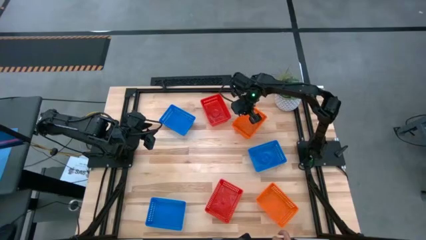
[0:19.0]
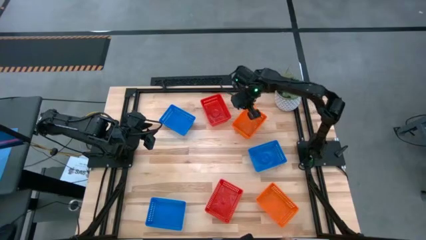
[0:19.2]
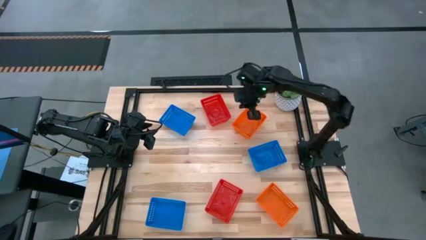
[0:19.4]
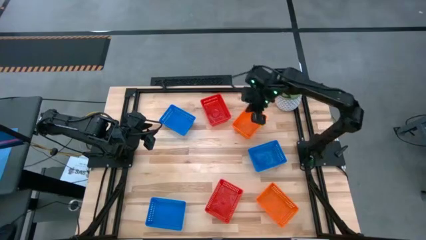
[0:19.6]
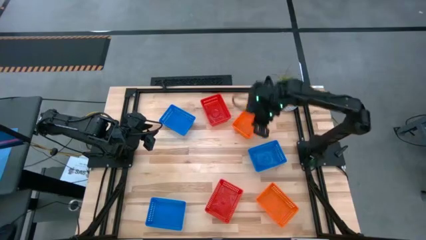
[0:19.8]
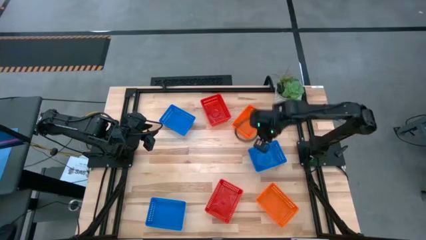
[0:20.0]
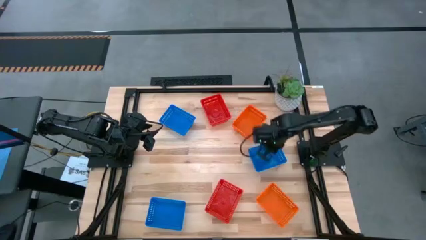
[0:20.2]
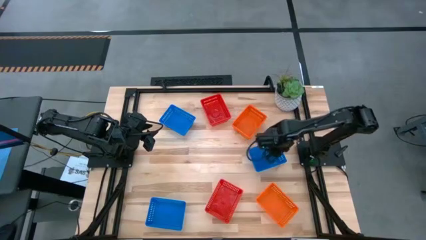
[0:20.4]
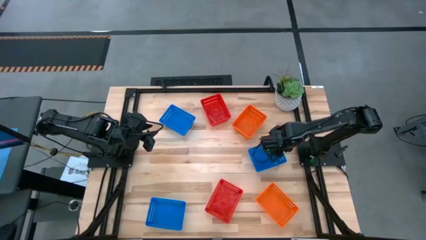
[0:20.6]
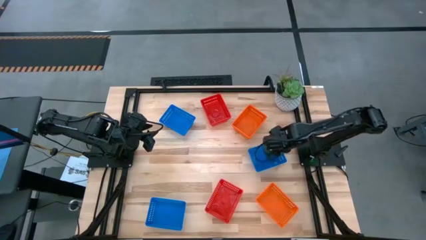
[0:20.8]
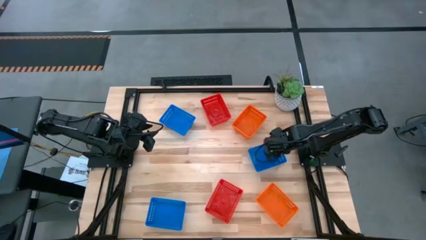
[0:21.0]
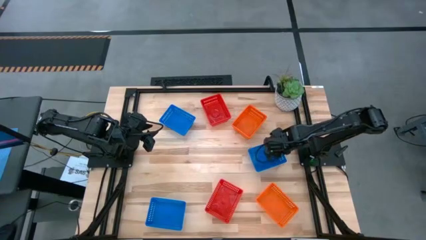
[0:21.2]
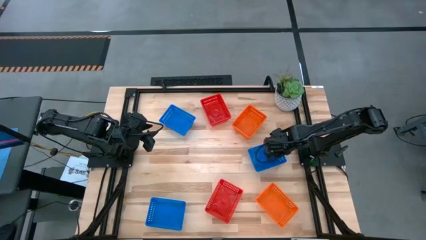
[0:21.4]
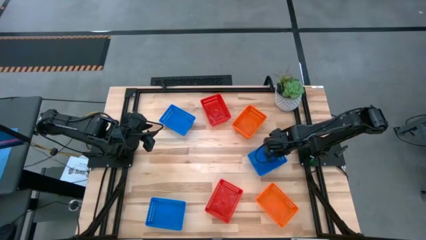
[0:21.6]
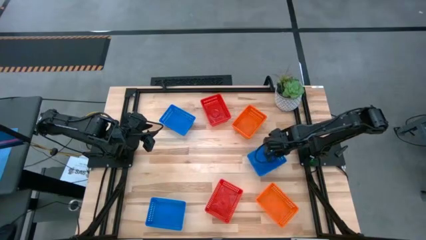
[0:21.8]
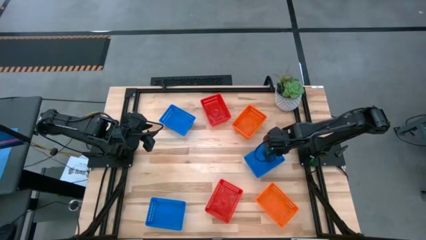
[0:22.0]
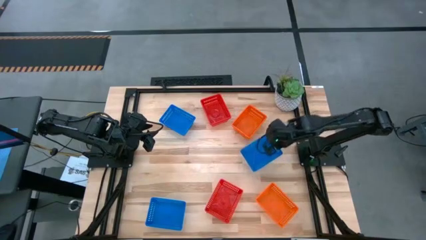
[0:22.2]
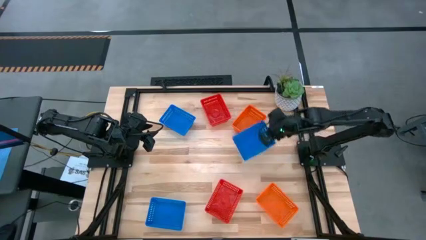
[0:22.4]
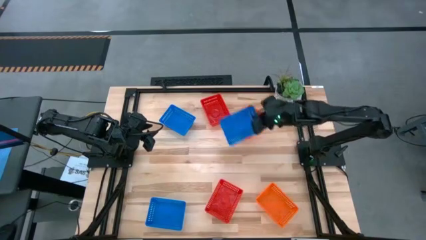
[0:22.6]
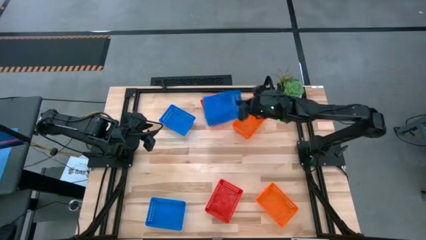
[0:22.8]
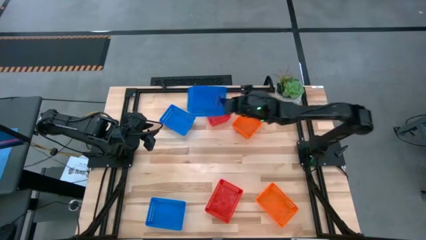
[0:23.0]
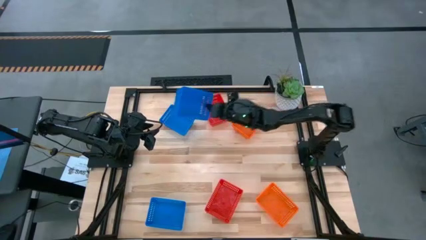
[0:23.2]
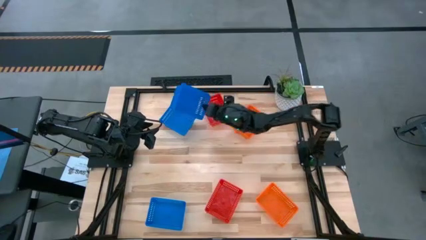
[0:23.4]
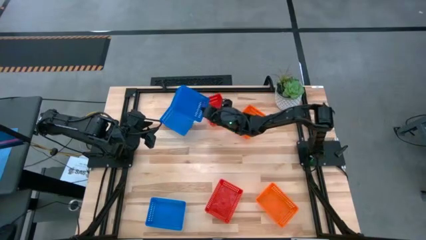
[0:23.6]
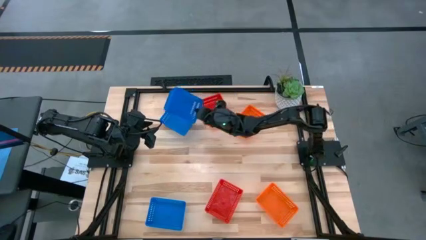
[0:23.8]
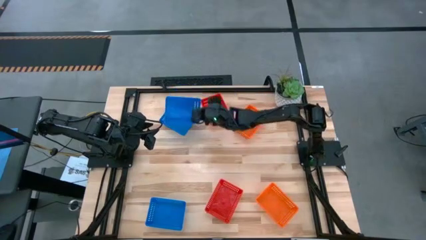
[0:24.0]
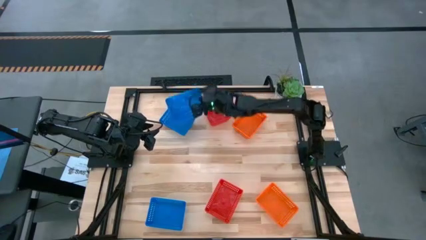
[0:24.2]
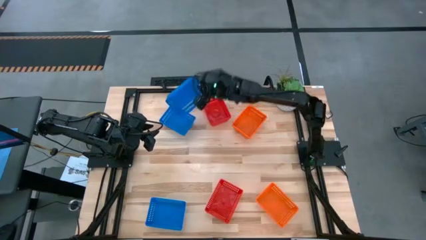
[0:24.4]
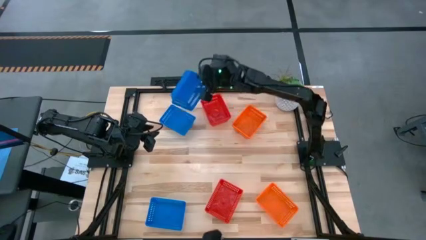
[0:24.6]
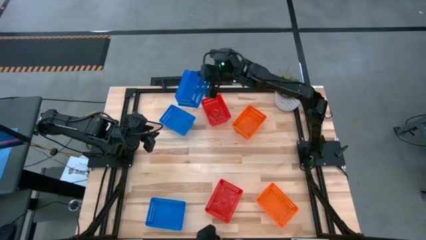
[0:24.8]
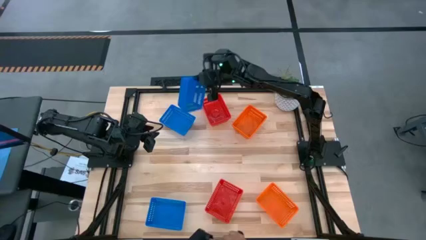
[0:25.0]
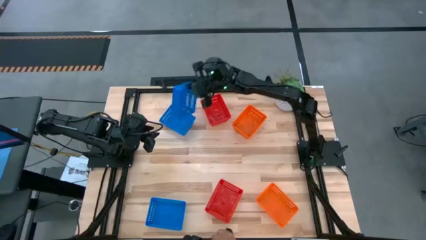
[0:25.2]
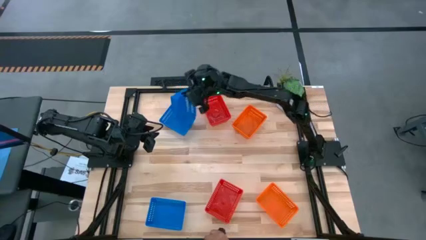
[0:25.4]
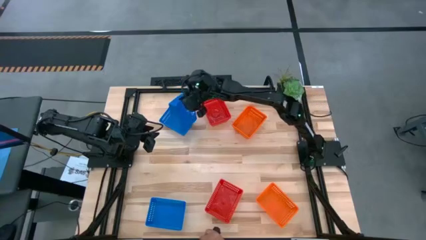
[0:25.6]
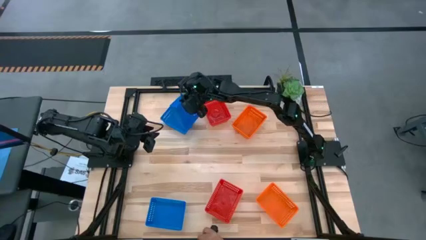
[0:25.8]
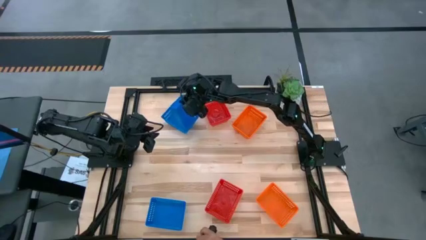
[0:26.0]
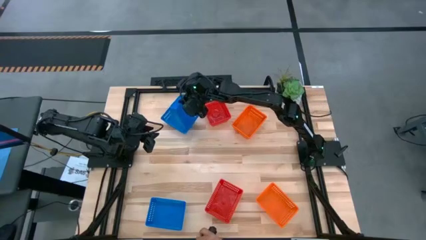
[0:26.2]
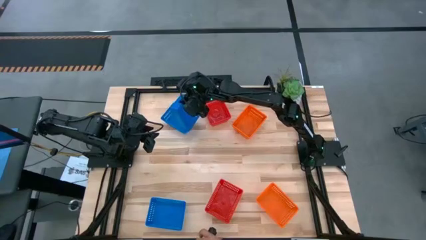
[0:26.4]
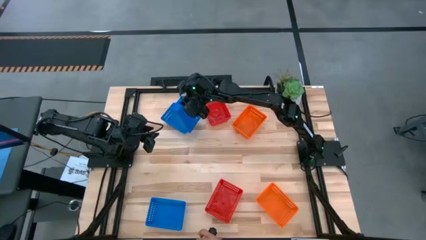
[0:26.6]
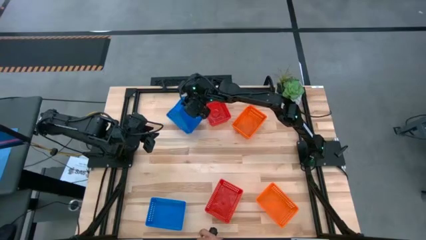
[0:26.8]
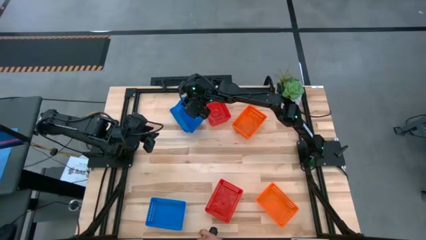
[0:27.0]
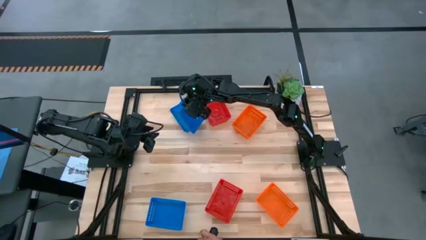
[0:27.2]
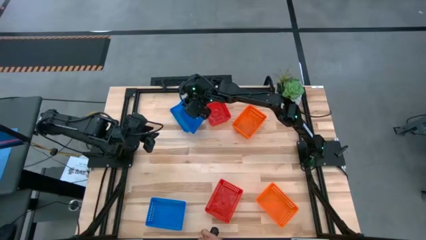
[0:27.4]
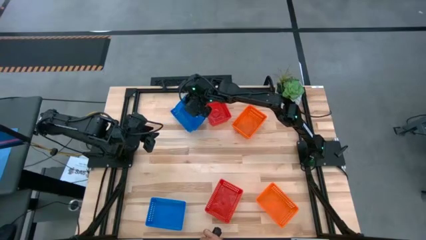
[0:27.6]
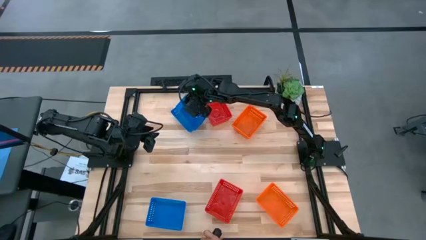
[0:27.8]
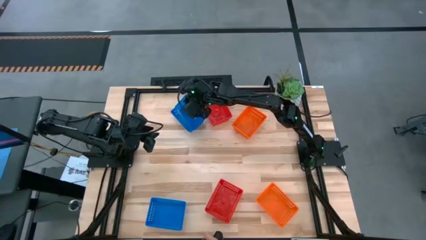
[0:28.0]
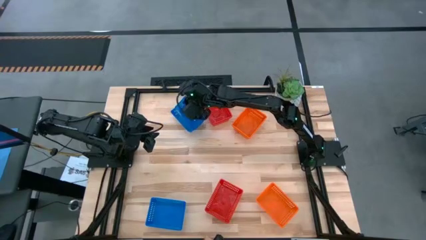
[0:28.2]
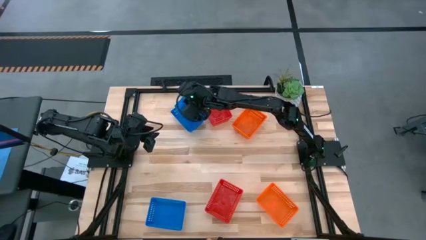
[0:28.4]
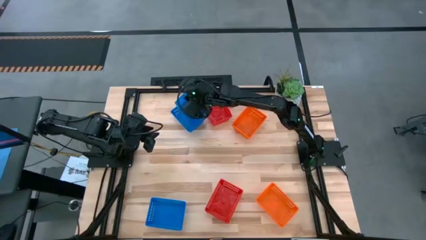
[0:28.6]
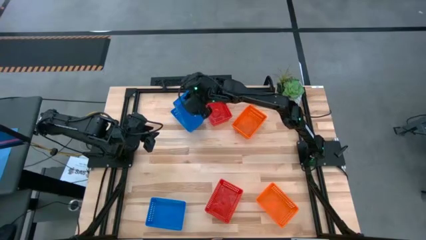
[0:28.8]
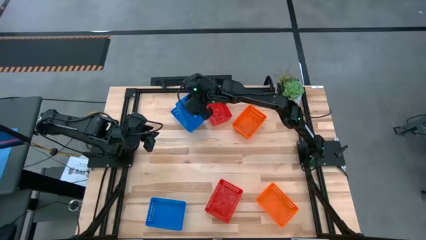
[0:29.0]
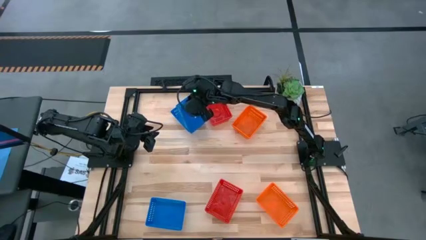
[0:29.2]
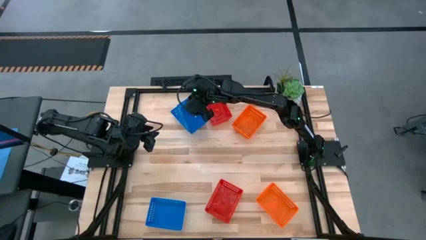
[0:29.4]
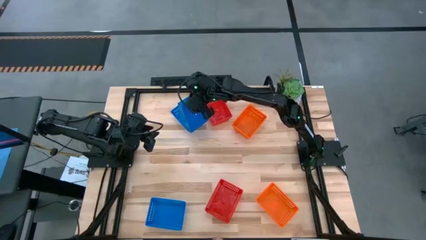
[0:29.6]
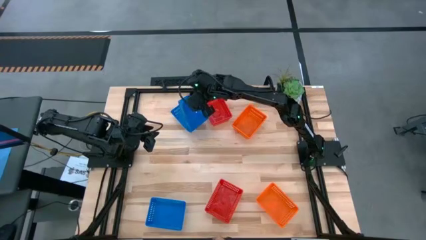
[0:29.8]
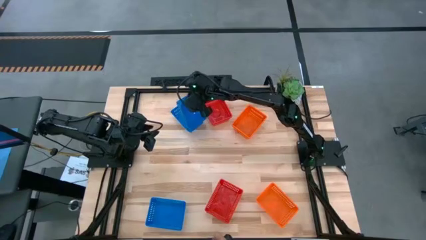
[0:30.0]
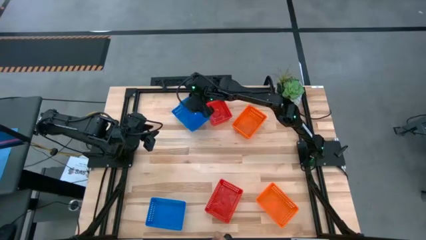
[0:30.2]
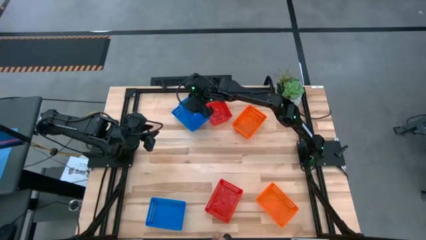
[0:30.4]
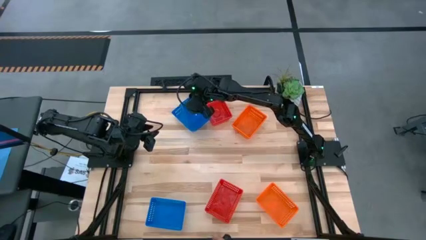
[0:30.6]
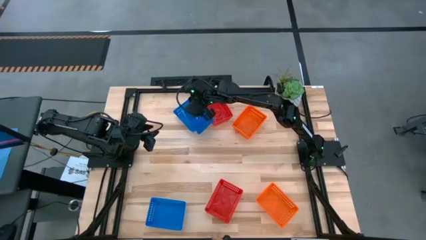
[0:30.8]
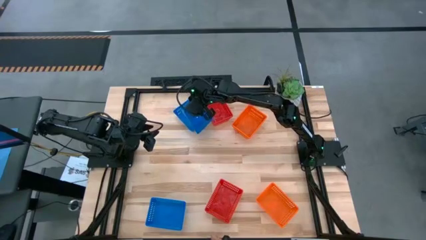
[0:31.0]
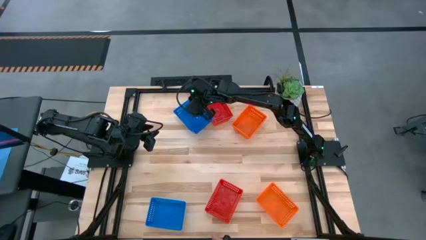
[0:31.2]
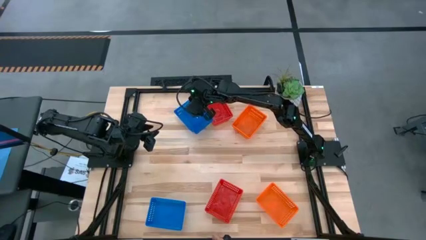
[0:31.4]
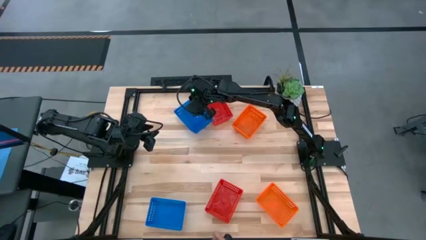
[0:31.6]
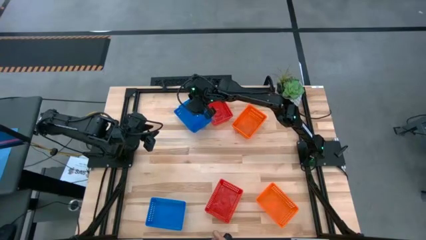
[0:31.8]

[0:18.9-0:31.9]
Stack the middle blue bin on the top blue bin
